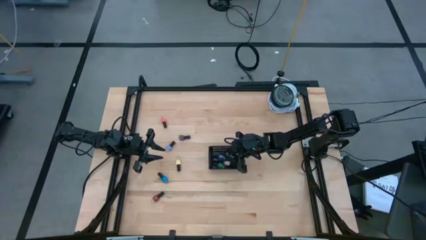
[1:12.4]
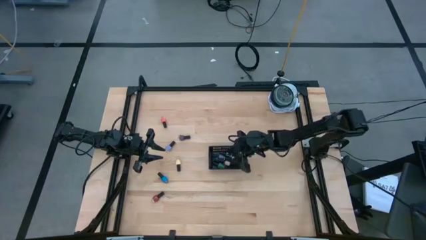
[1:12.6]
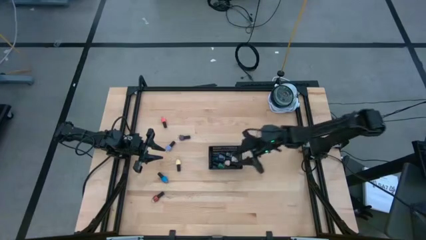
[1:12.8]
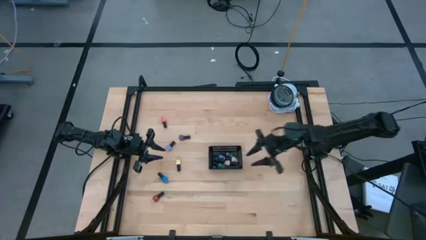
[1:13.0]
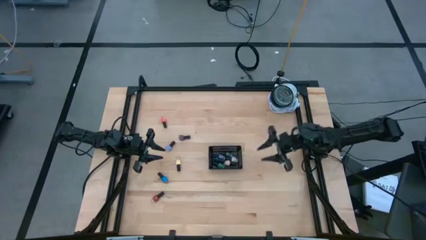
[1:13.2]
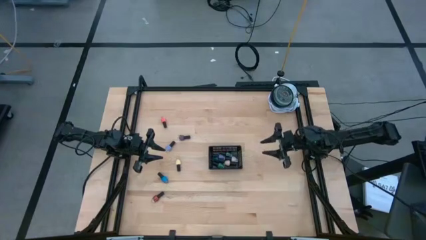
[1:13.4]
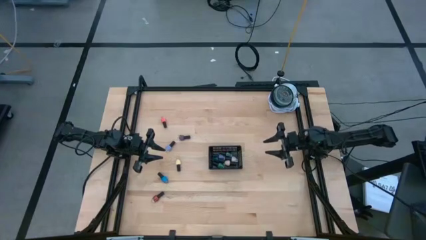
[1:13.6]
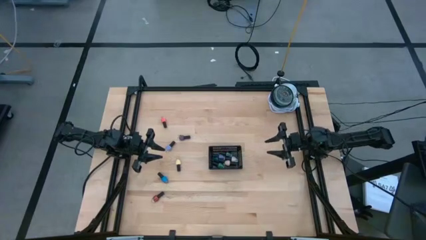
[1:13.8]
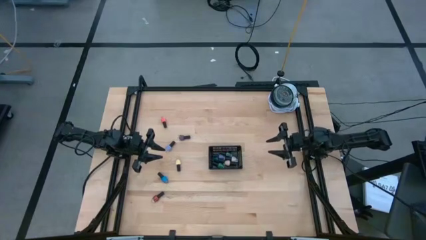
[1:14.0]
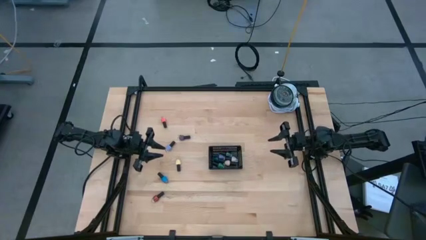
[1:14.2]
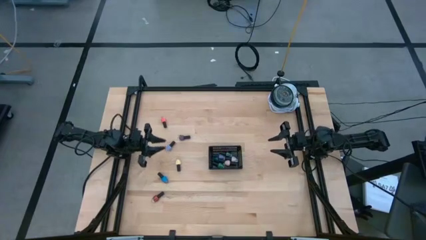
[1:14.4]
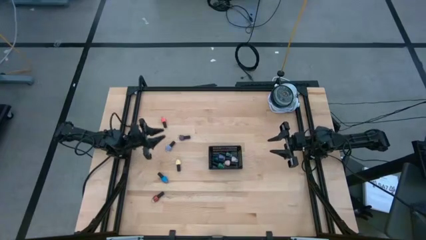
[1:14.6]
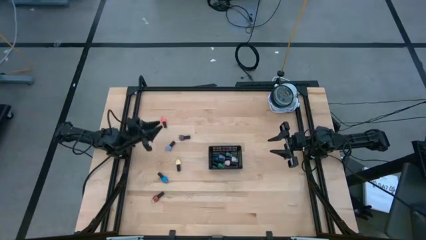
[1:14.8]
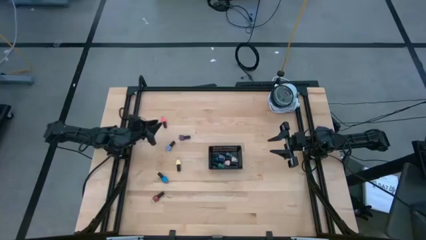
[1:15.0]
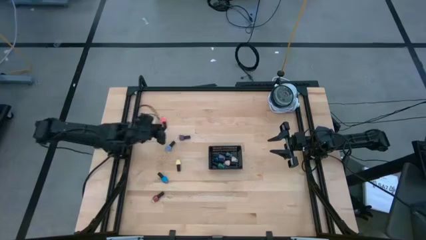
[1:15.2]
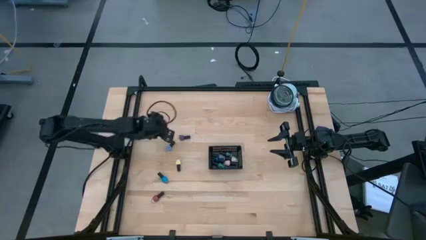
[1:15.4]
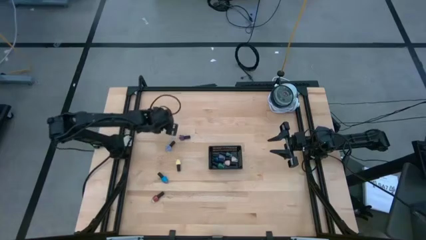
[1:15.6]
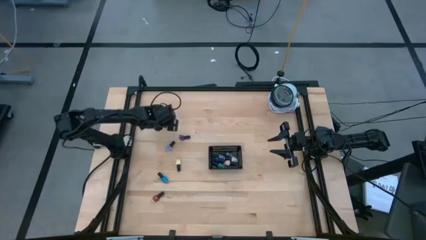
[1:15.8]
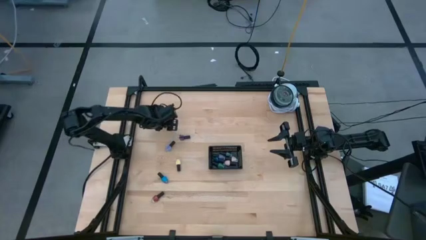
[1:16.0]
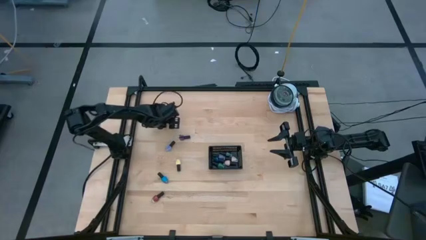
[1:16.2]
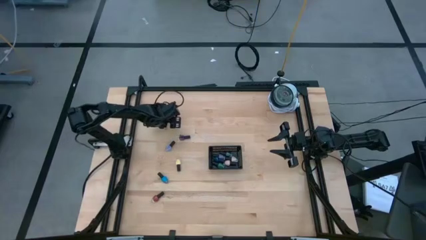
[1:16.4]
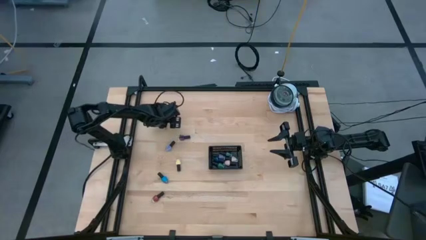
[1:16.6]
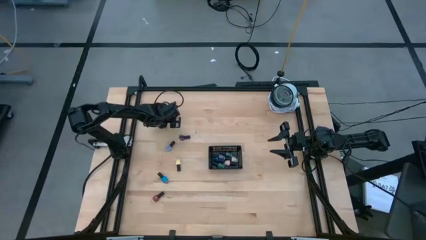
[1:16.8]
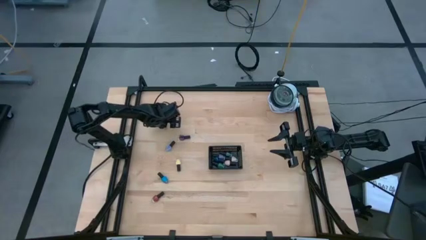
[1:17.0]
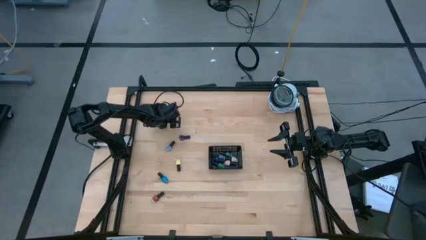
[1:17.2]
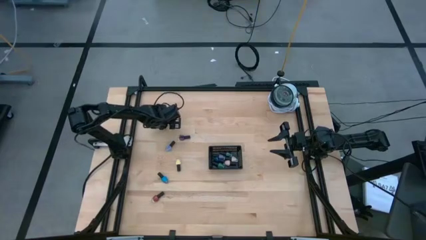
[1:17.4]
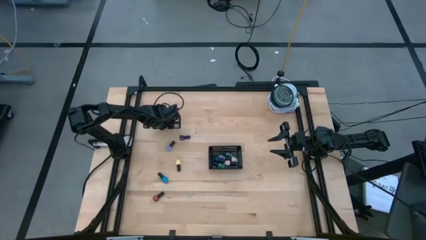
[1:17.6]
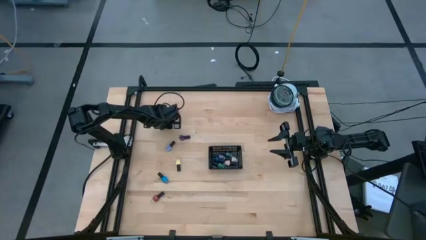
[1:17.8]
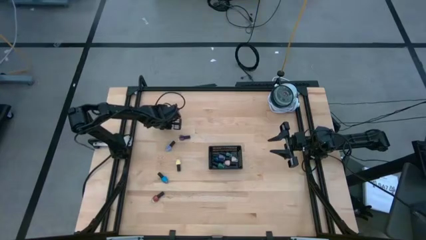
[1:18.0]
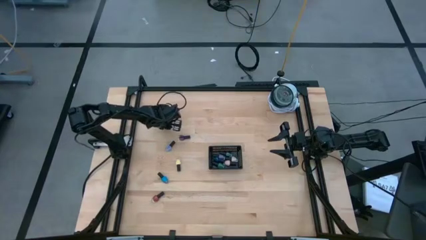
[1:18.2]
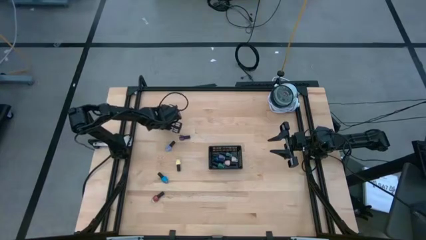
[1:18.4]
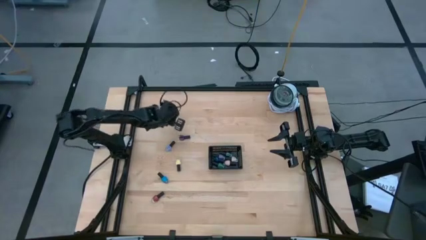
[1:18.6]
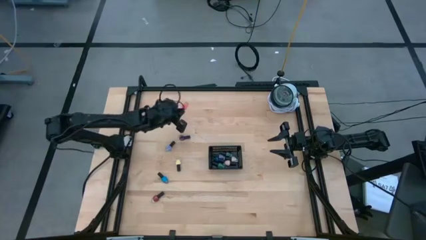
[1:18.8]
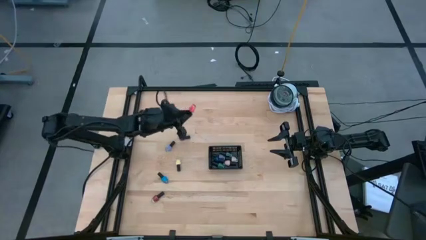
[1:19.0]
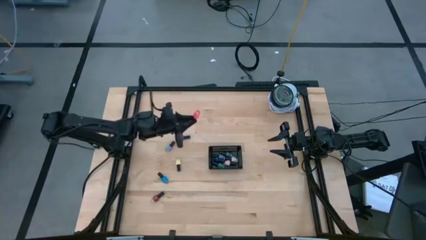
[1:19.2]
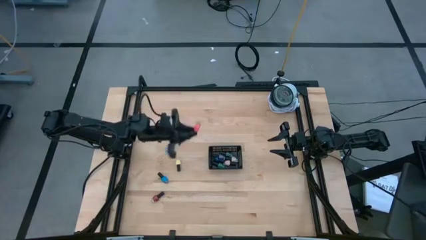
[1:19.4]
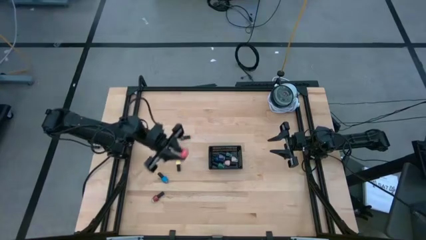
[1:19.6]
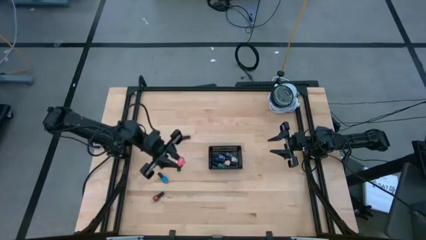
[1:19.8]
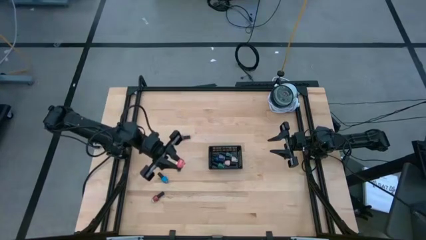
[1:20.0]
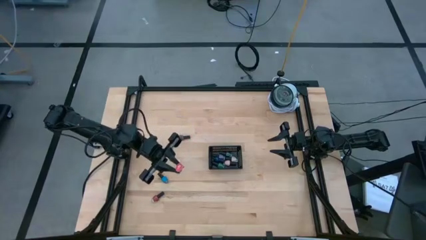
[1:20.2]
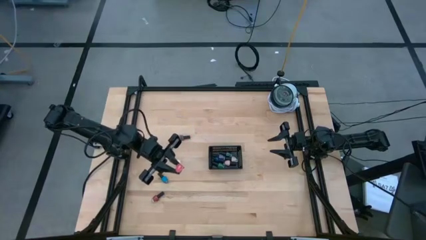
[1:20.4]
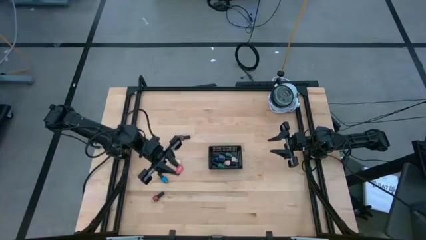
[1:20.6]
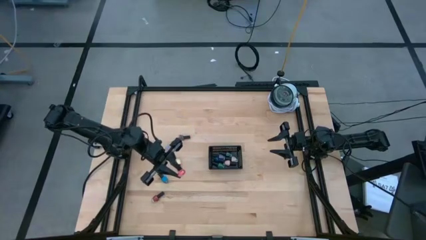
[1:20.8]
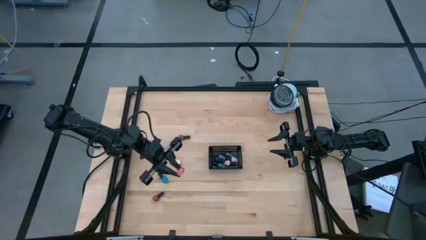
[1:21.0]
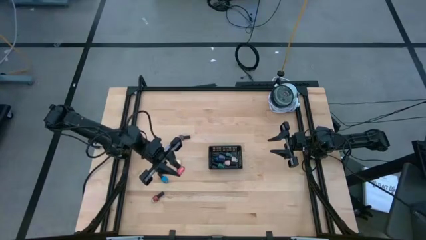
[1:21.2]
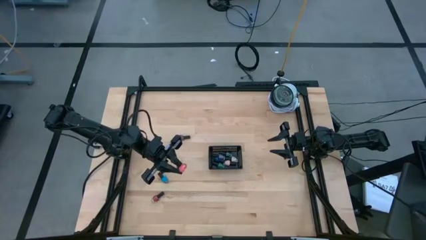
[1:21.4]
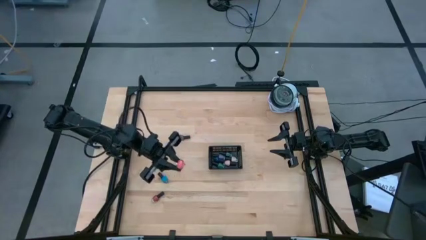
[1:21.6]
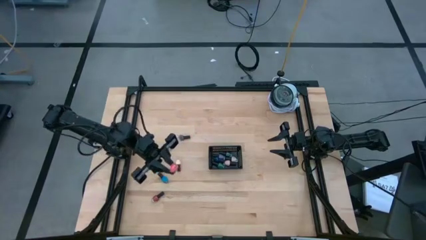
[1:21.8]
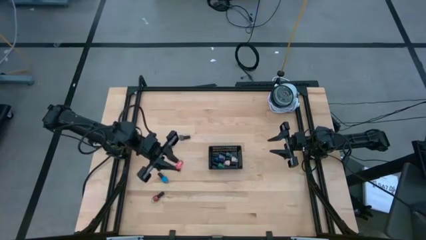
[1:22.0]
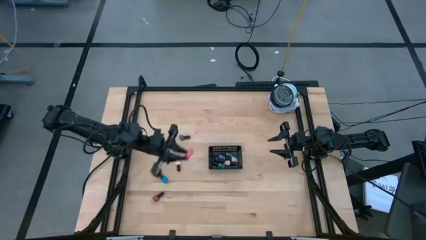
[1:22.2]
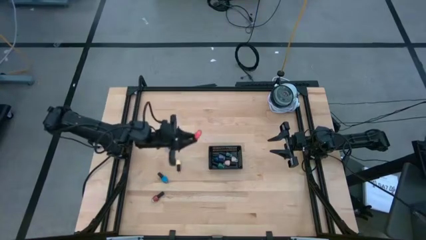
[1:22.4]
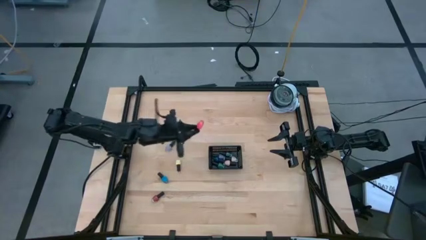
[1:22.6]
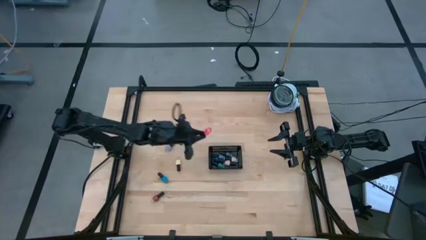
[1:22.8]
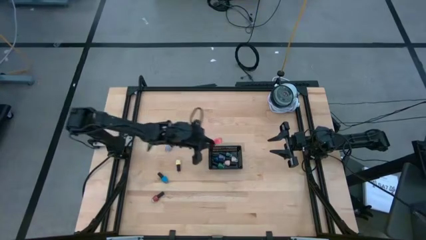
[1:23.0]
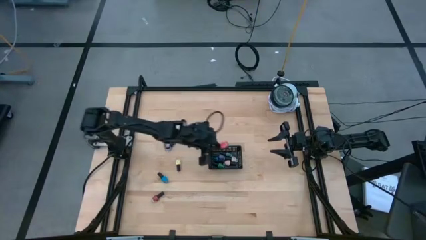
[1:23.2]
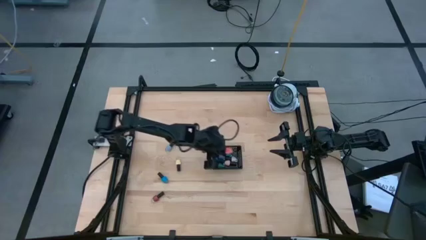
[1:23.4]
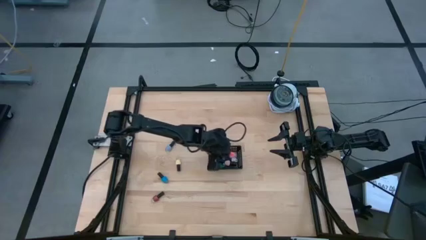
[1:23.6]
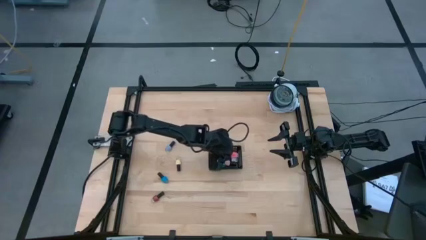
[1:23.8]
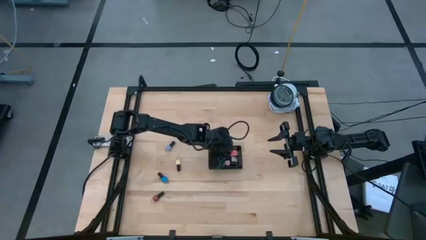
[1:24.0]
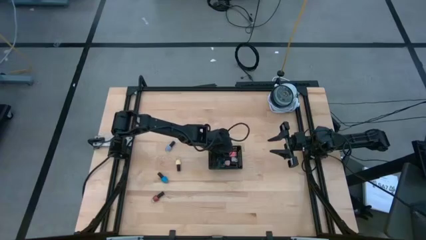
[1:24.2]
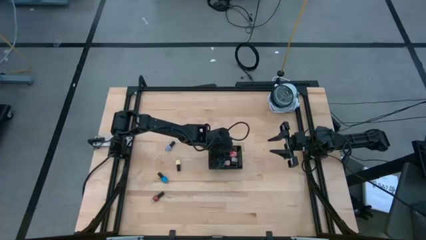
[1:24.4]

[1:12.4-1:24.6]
Task: Pick & Place Nail Polish
Put the pink nail polish into the black bin

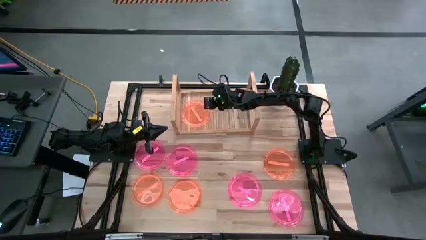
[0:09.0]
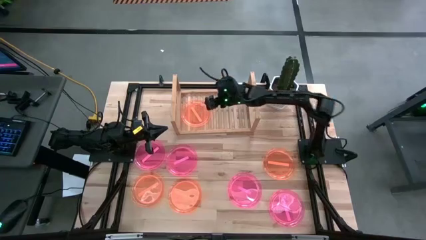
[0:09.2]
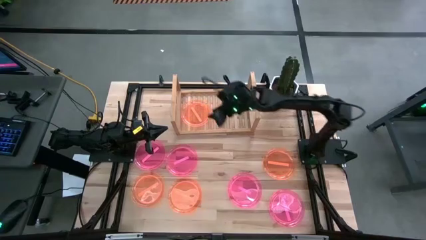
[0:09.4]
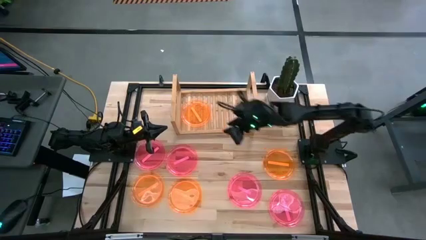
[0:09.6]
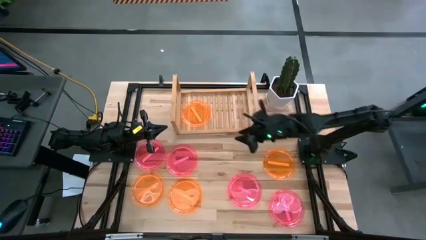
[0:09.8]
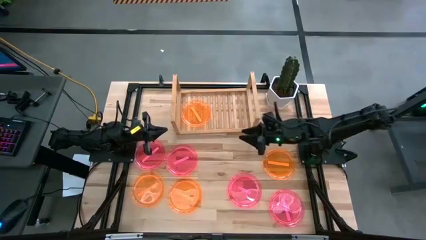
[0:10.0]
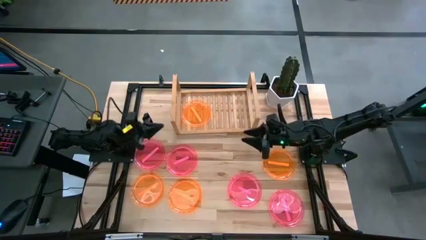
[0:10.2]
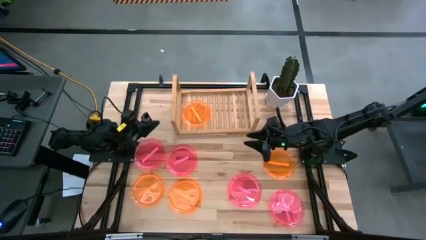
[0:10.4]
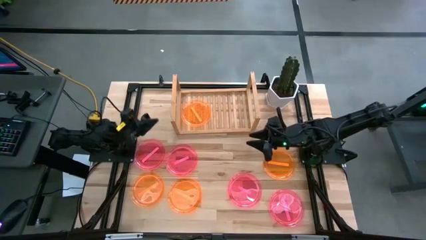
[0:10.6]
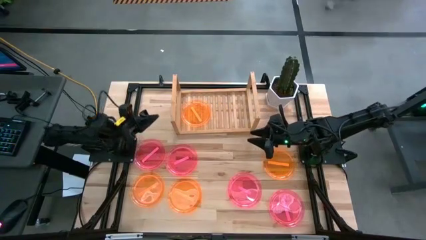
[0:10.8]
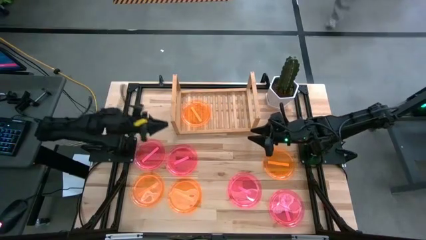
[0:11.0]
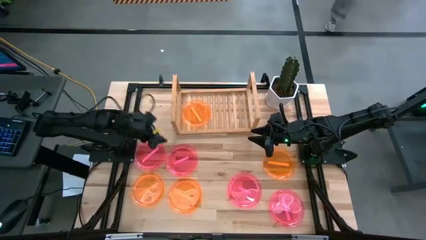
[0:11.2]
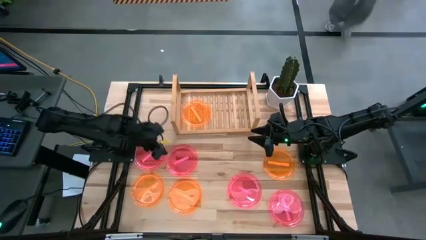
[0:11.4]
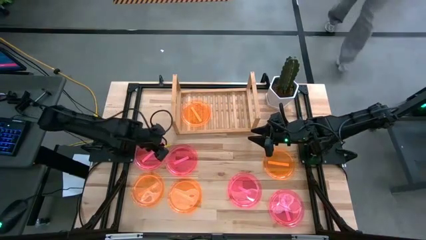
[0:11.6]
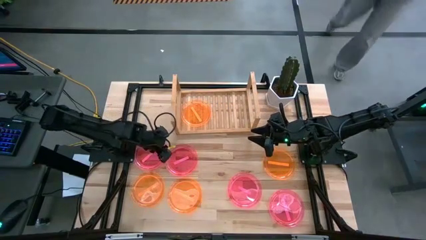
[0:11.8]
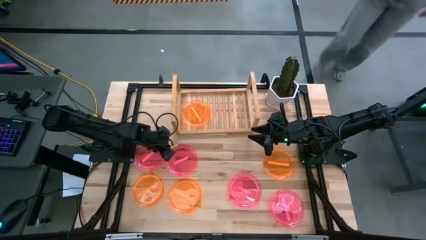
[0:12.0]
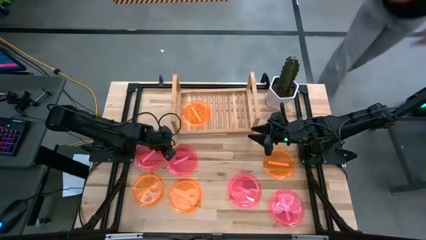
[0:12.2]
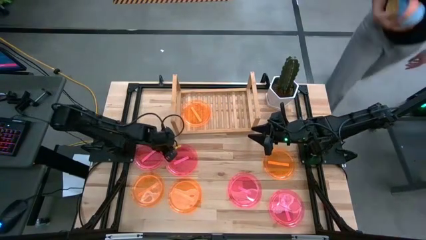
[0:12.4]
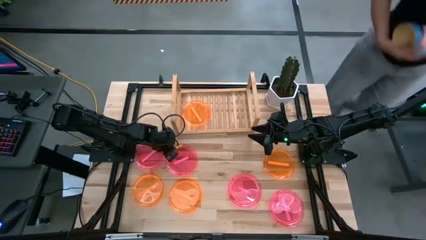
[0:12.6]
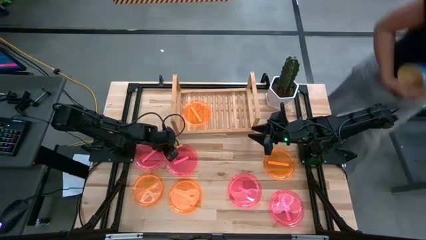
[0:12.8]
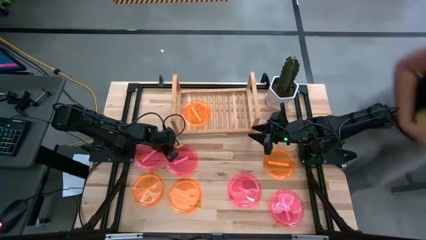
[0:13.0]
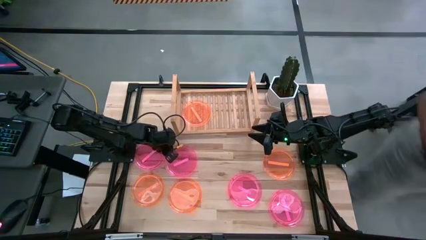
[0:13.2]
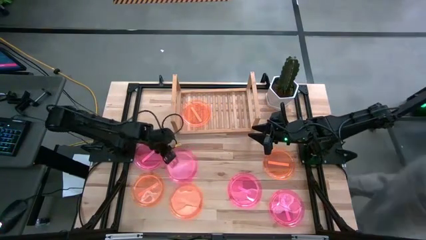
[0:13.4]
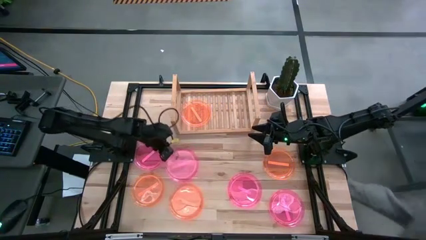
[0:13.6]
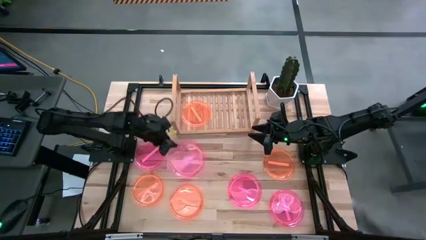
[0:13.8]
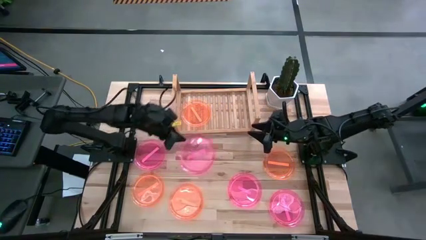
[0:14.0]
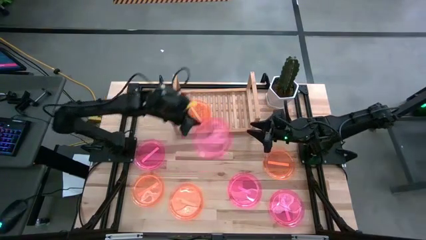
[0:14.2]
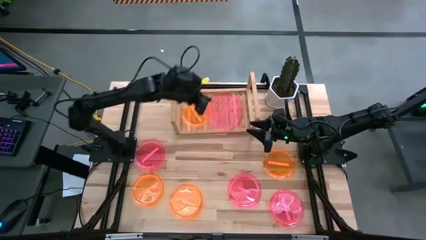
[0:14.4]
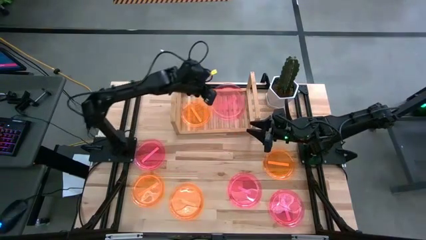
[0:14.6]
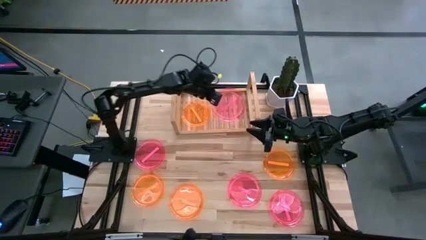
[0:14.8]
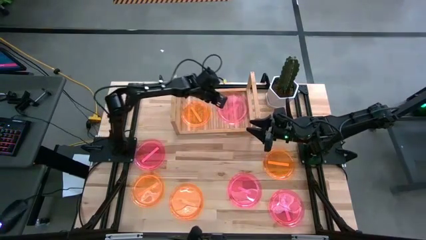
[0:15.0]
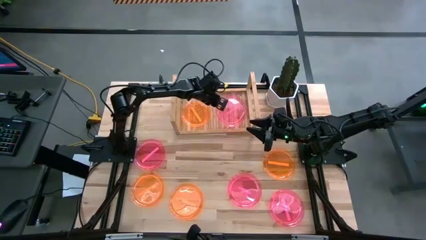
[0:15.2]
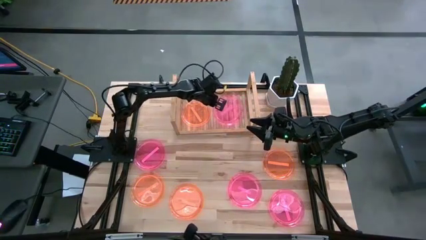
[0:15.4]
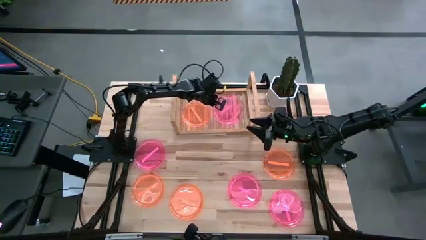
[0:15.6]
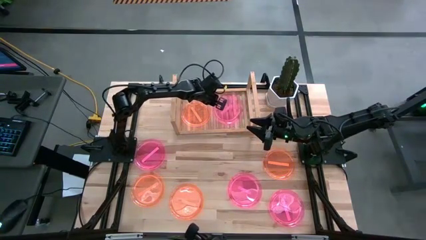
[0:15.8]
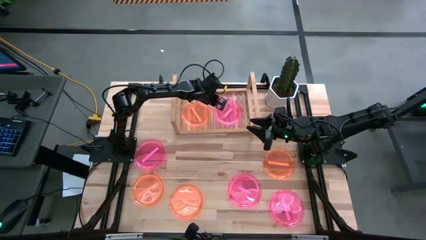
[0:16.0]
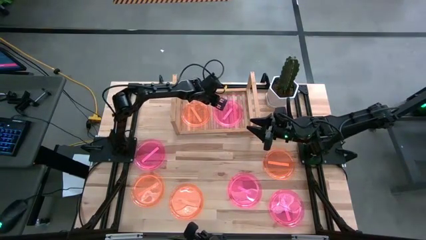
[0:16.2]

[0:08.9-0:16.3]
Task: Place and stack plates onto a shelf
Put the top center pink plate on the shelf
